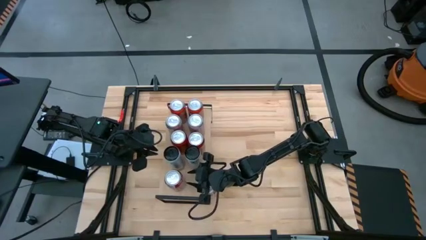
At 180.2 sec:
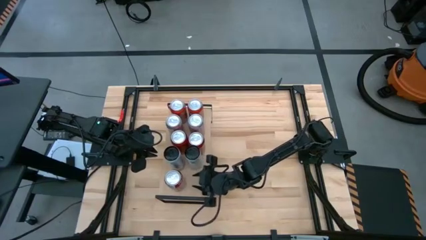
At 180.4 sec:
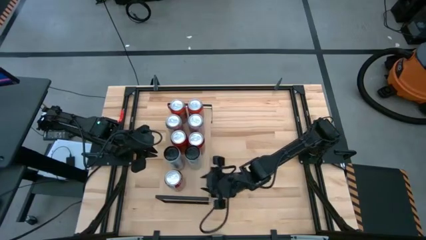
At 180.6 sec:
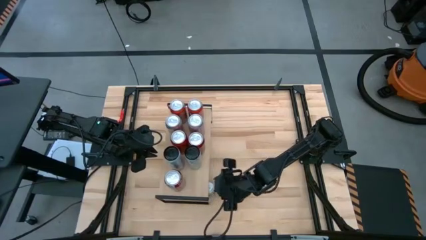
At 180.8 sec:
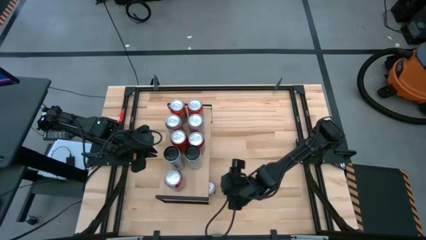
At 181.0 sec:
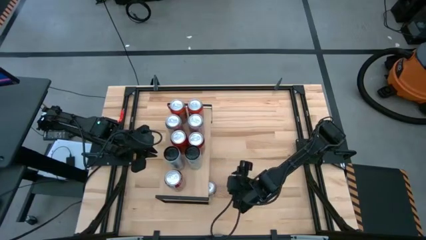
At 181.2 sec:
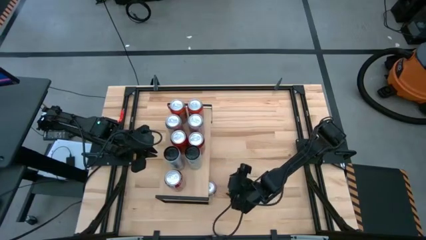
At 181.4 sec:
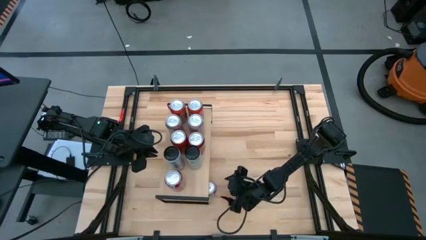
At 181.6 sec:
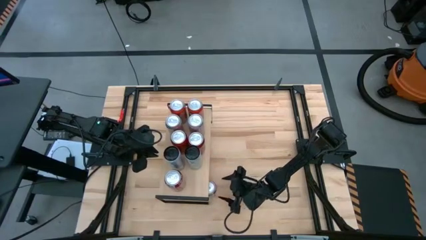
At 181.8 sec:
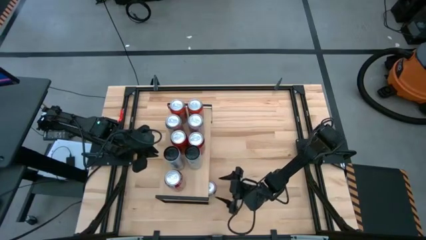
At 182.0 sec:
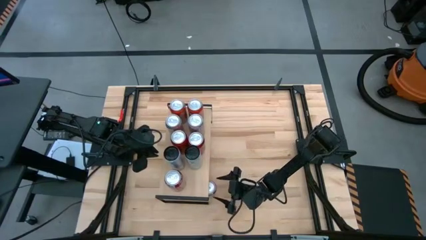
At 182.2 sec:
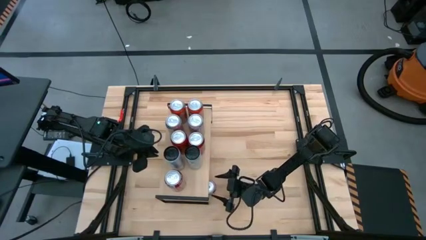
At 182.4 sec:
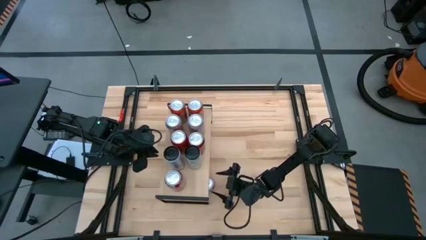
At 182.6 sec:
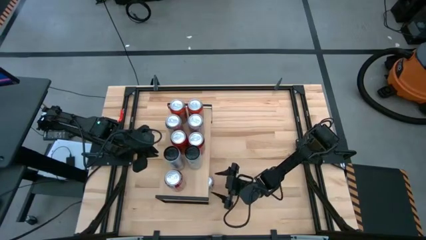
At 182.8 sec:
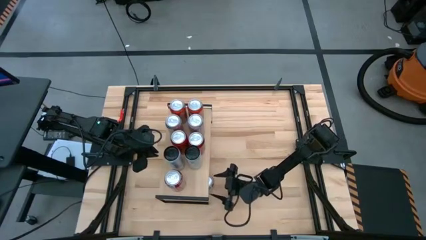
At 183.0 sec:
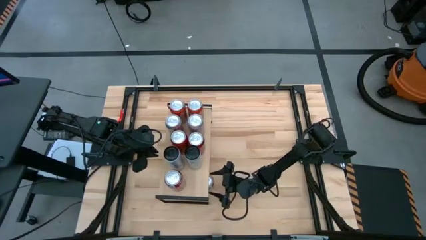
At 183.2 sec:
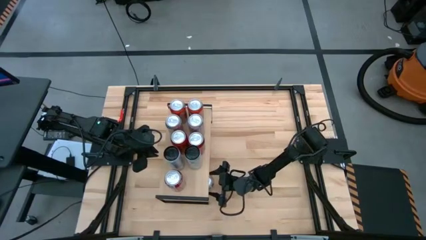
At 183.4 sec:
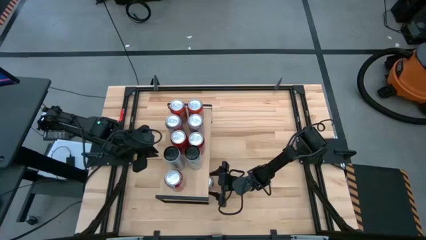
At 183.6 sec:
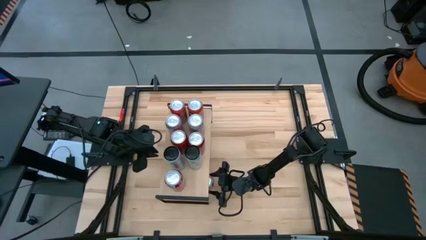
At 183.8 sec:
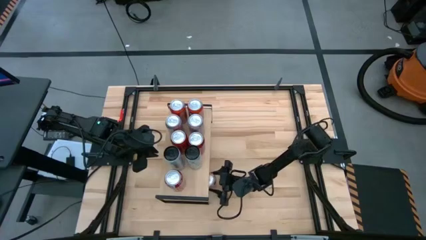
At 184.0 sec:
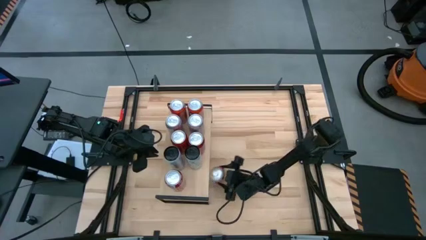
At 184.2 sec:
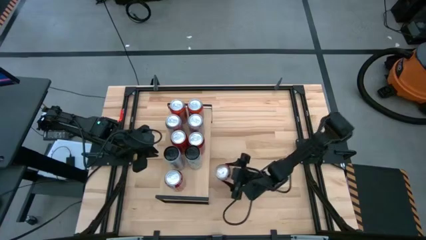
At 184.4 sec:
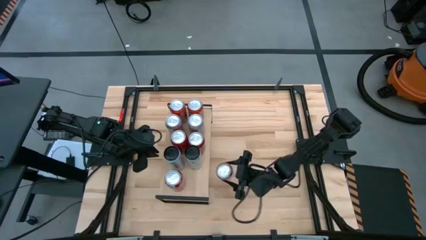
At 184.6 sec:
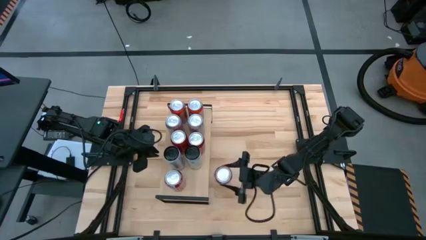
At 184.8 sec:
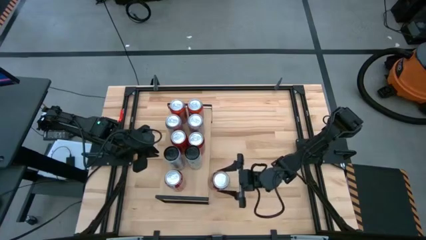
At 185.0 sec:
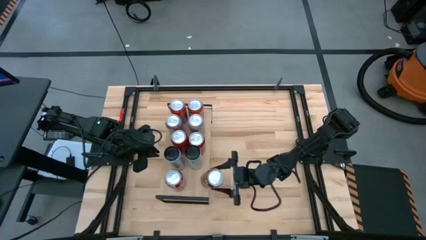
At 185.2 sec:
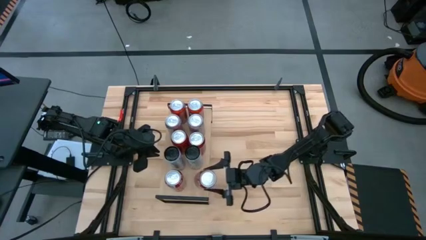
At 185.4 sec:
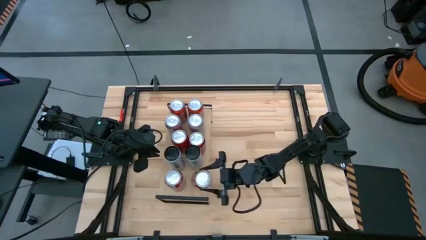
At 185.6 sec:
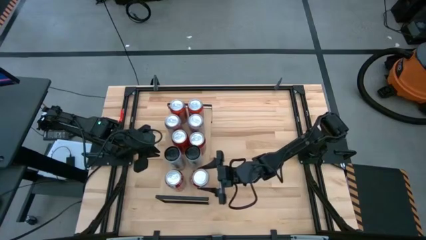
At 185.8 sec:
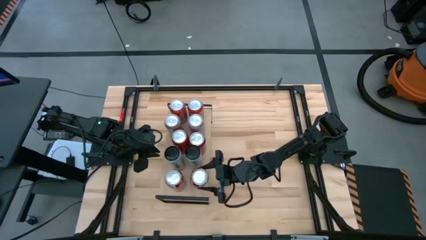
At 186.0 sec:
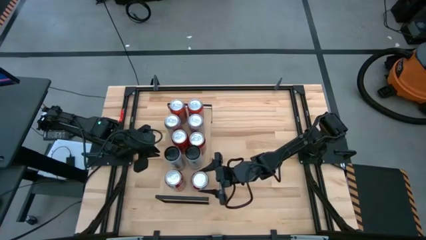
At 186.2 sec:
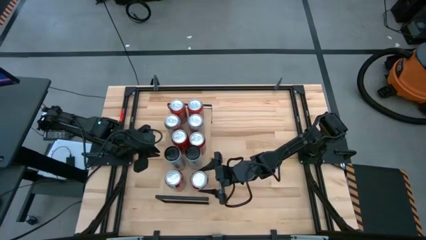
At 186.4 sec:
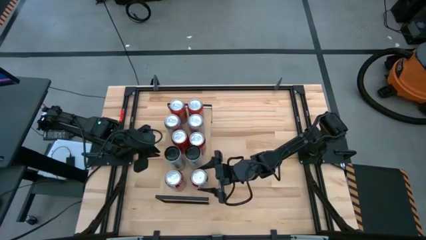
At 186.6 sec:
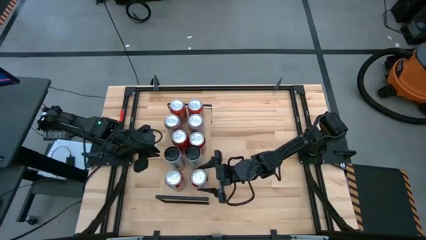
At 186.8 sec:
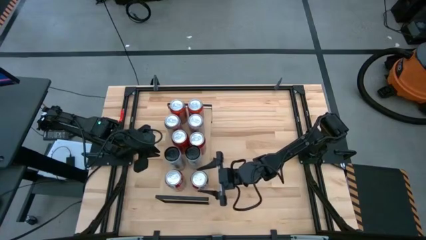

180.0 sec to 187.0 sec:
Task: Place canned beverage on shelf
Put the red silver soda can on the shelf aligned with the other red silver soda can

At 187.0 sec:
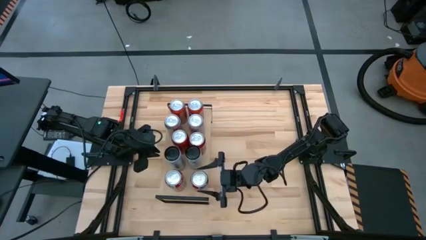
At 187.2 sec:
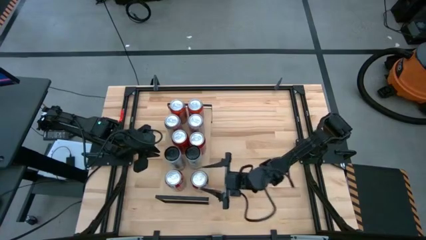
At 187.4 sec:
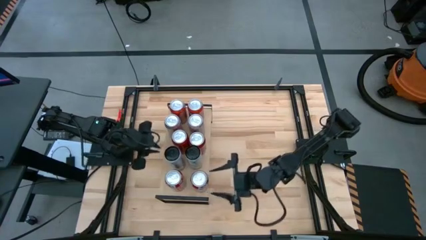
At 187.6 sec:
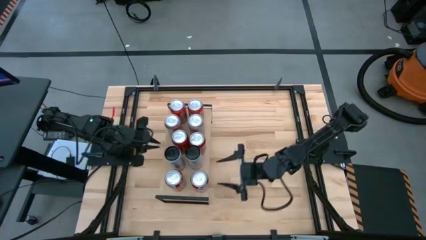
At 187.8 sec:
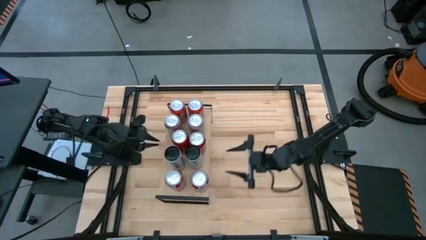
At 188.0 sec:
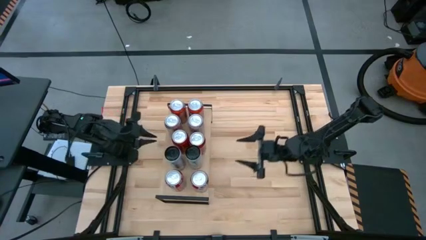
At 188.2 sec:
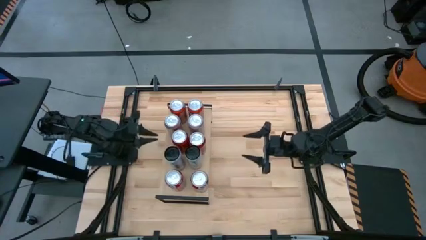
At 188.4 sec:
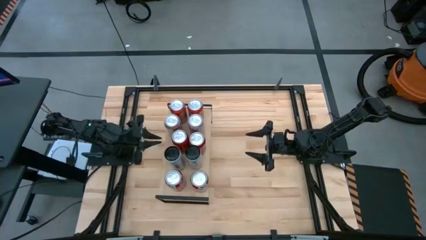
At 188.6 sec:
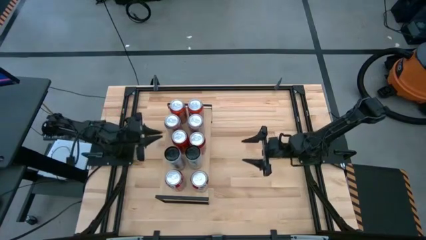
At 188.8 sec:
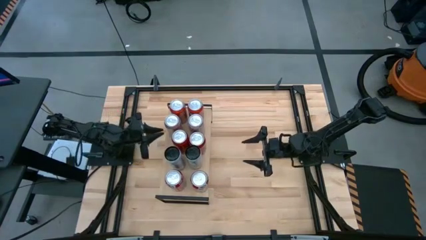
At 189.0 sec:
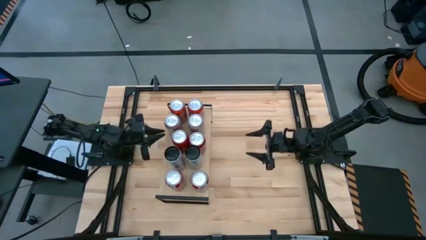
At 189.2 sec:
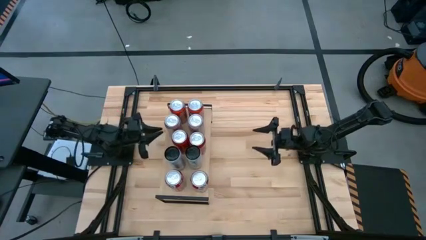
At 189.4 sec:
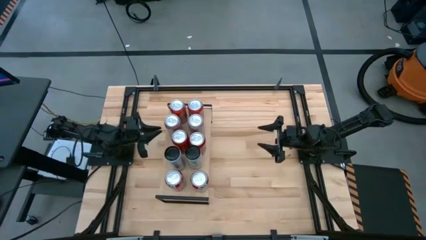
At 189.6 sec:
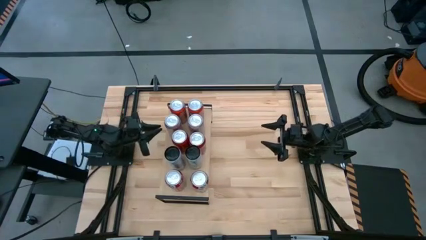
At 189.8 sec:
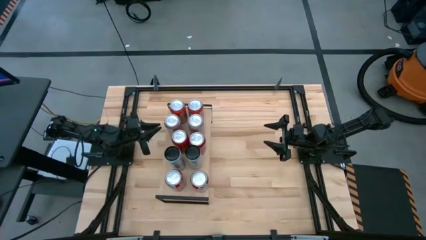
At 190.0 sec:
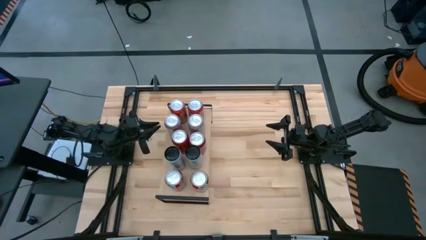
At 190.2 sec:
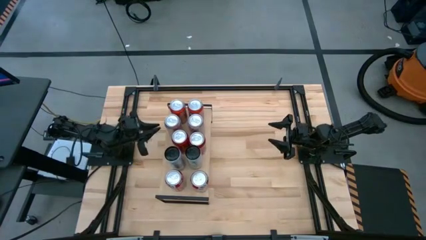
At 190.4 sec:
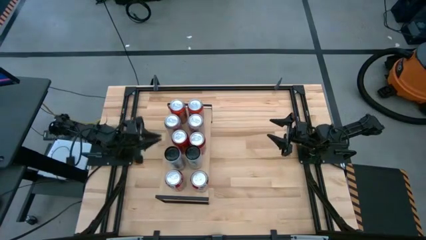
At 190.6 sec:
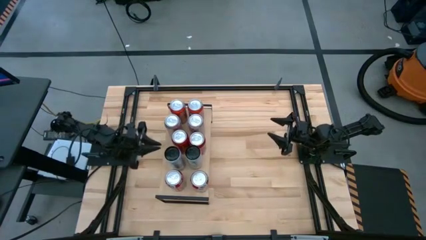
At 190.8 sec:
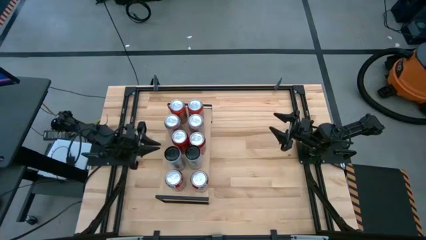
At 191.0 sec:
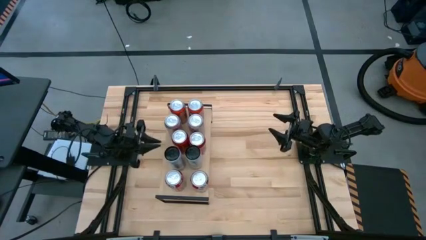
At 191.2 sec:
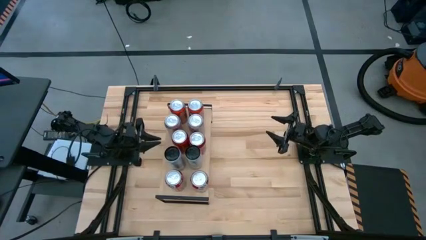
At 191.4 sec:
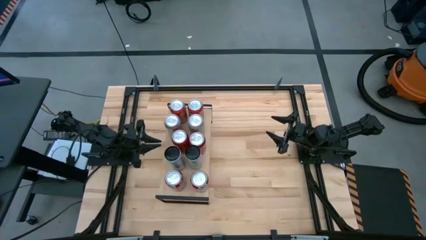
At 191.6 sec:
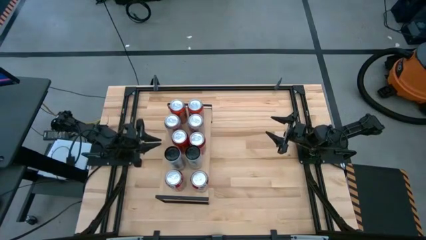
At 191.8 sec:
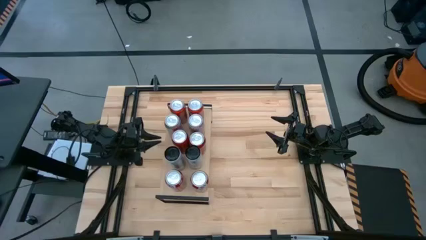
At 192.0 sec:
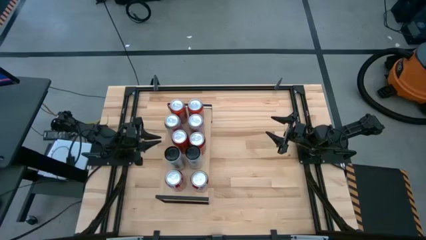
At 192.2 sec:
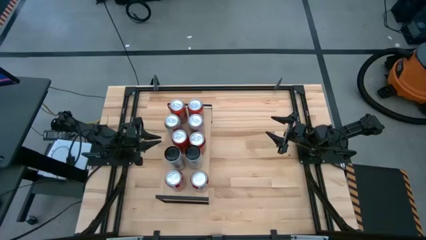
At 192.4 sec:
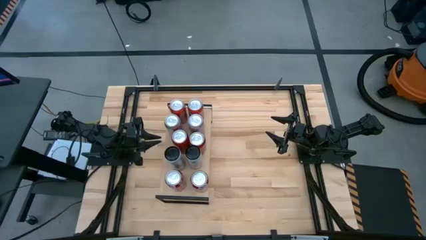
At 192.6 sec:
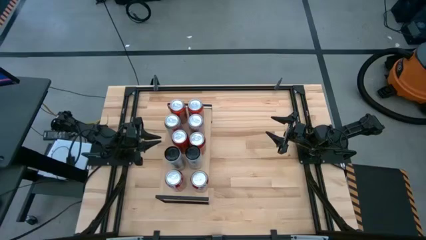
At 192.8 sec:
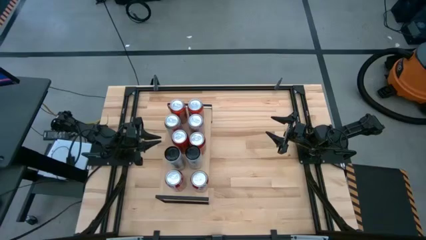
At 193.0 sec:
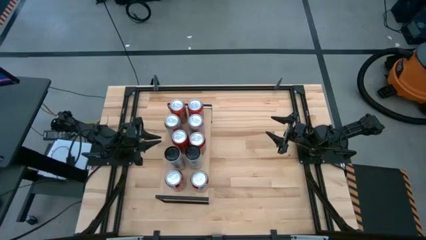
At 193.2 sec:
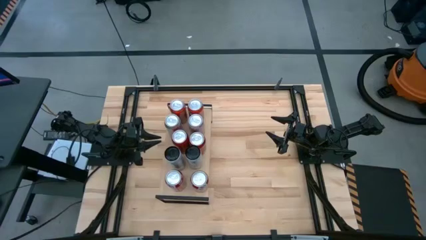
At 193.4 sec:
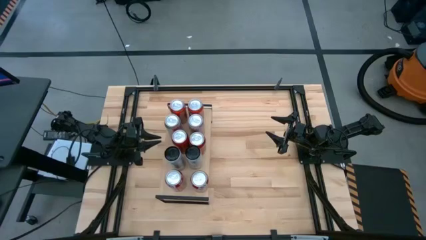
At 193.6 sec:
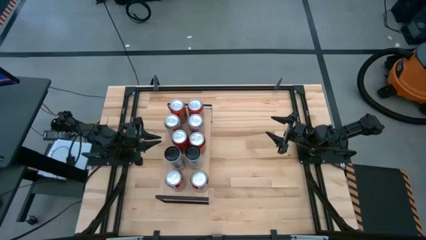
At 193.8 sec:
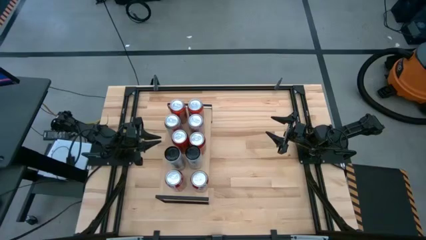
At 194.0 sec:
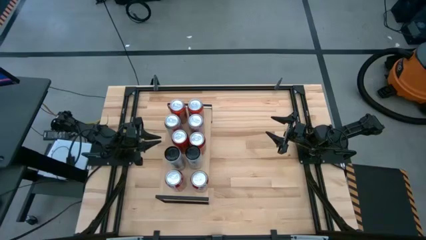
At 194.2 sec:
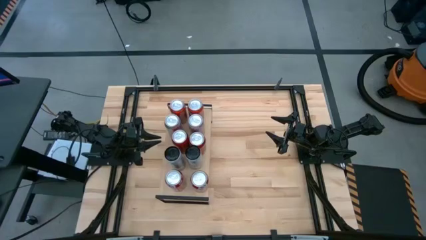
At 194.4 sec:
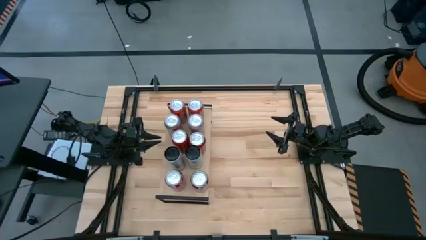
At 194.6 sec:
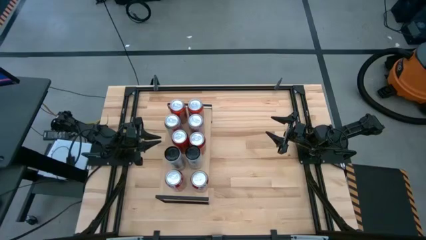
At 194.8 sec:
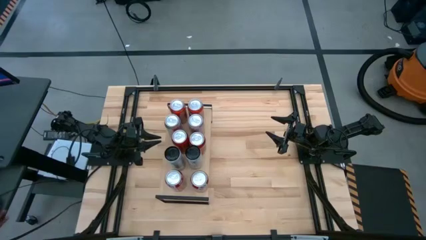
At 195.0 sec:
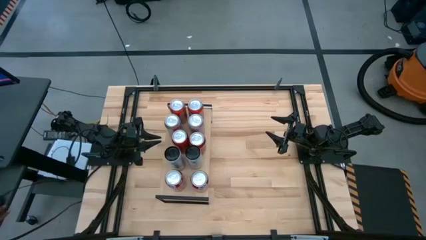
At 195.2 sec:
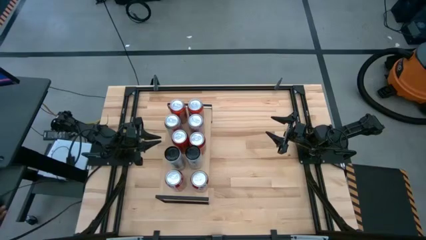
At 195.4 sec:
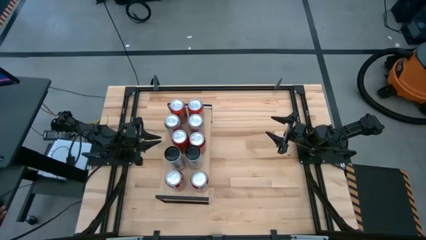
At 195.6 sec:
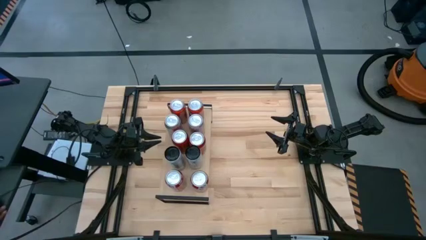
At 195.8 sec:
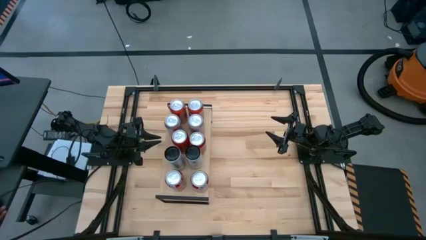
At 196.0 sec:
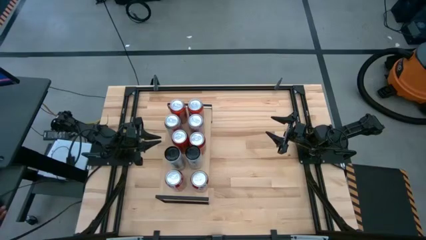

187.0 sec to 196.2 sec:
Return to Home Position
